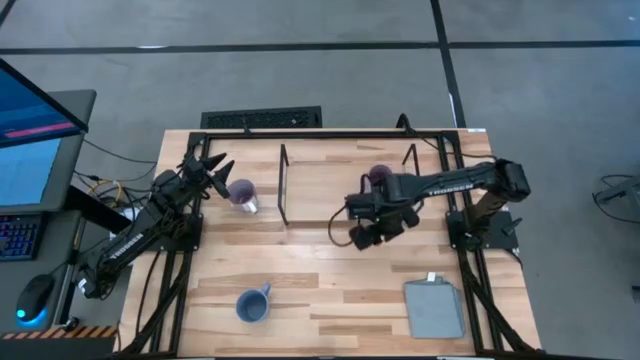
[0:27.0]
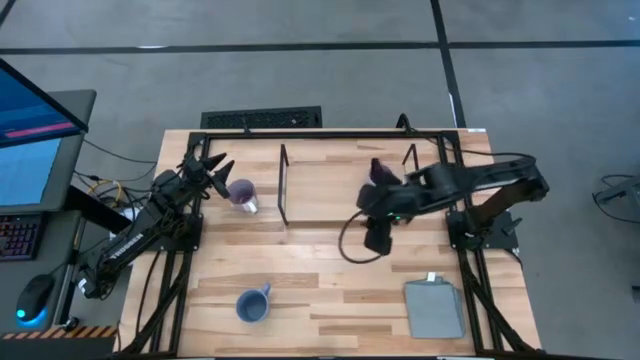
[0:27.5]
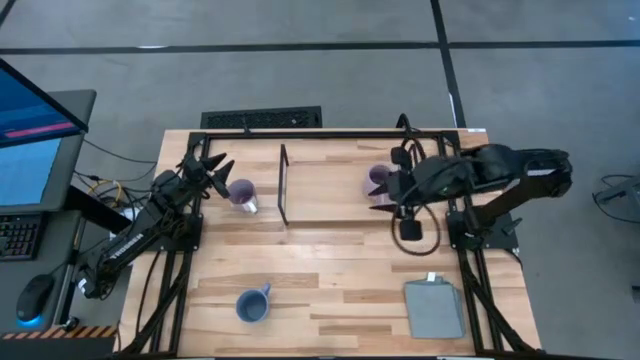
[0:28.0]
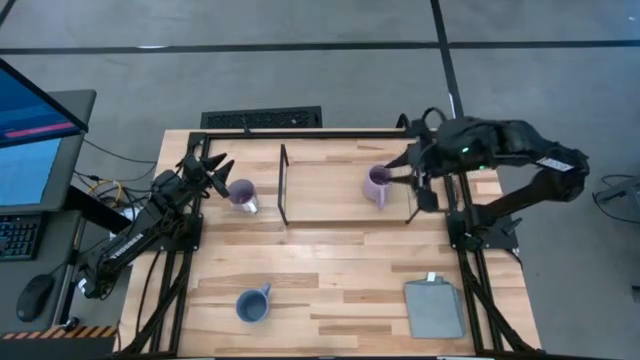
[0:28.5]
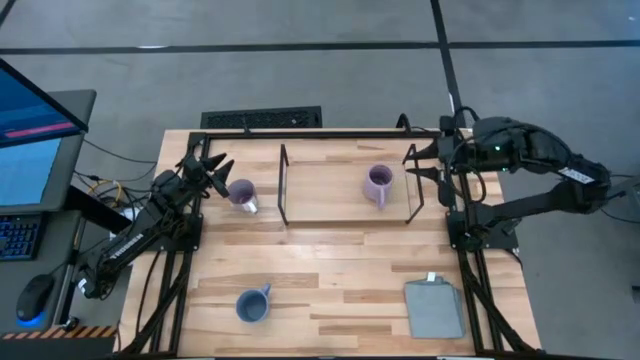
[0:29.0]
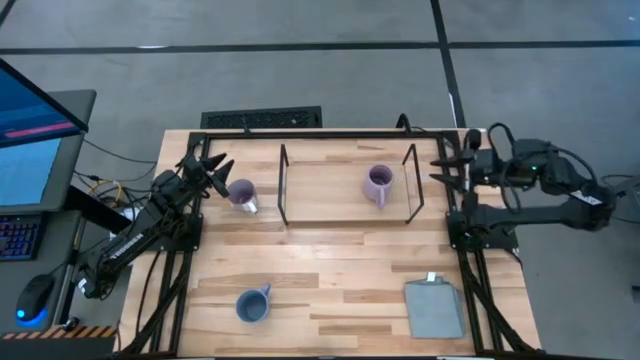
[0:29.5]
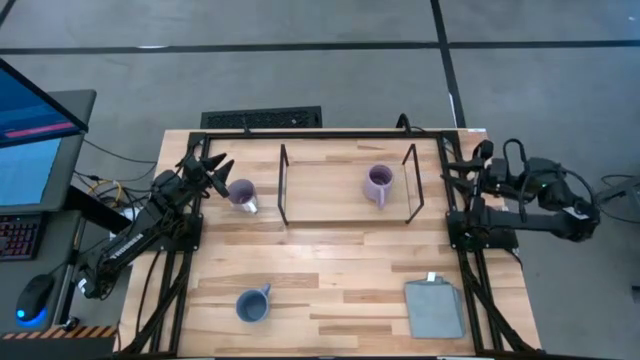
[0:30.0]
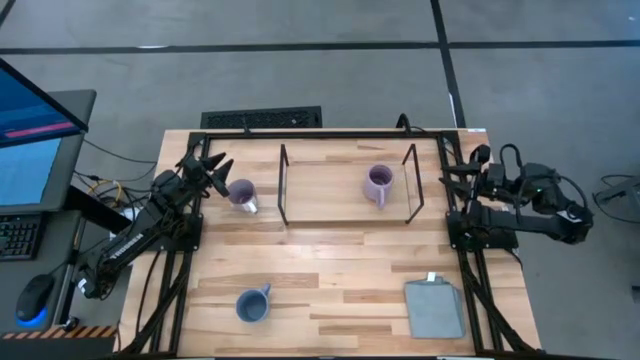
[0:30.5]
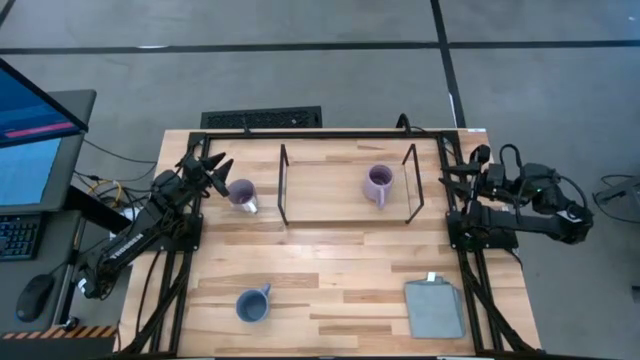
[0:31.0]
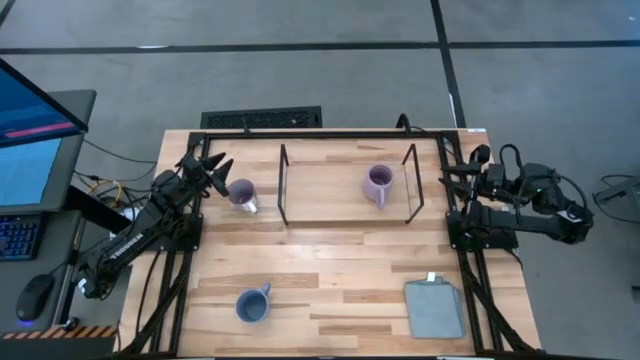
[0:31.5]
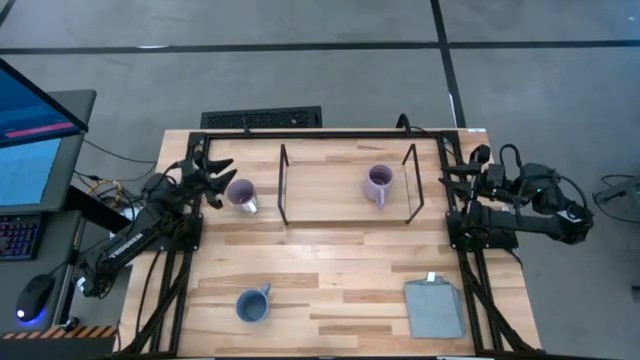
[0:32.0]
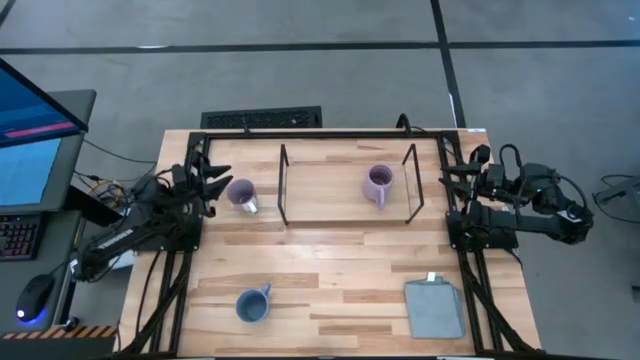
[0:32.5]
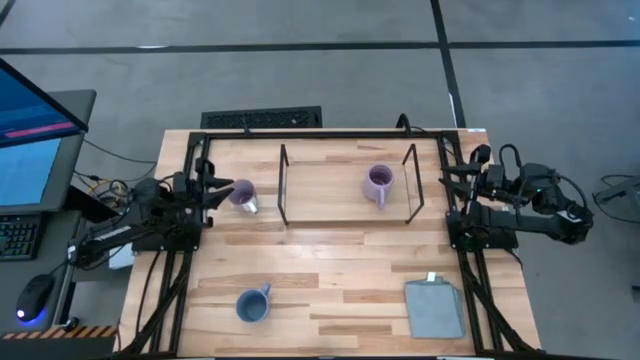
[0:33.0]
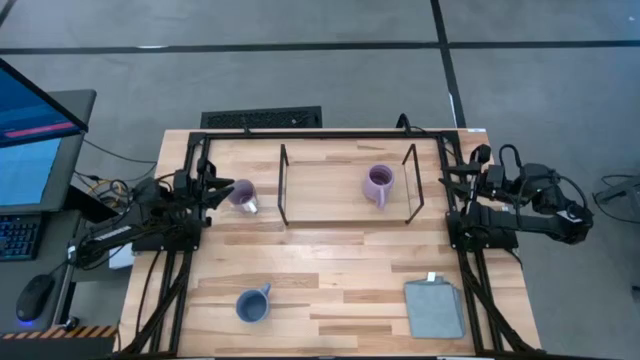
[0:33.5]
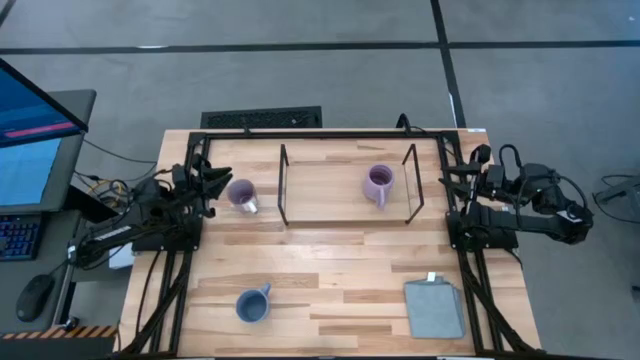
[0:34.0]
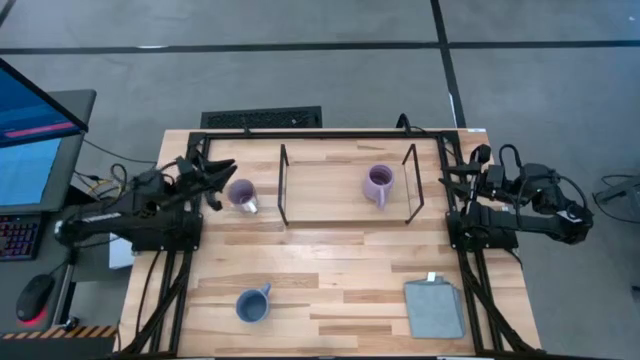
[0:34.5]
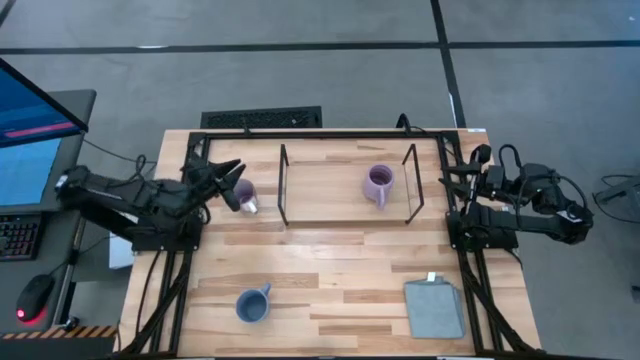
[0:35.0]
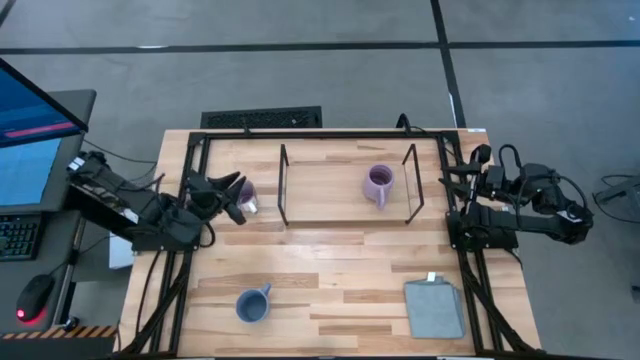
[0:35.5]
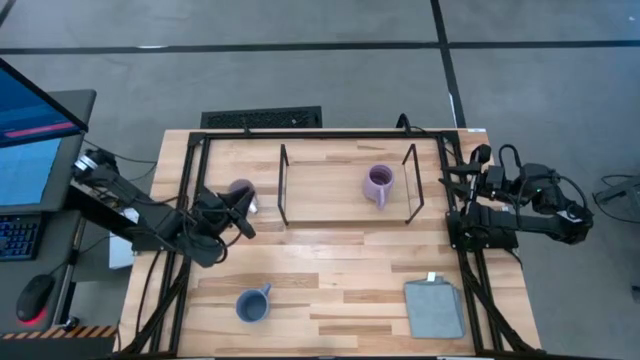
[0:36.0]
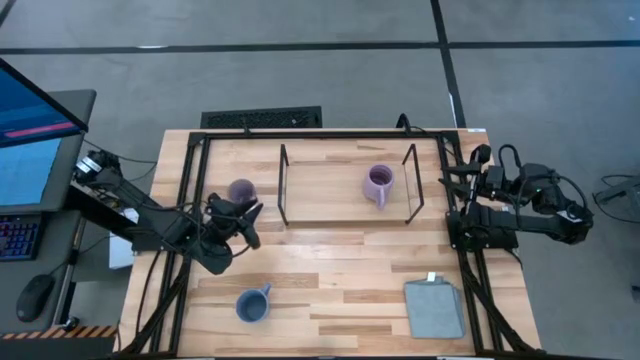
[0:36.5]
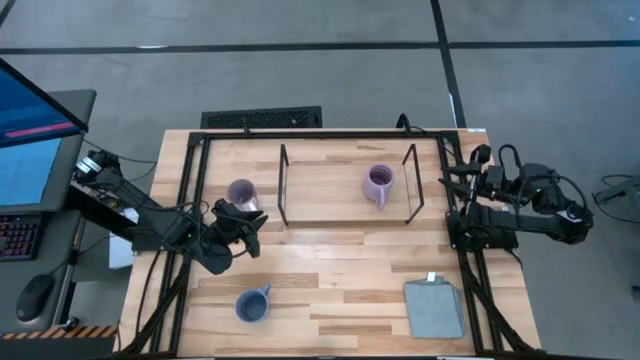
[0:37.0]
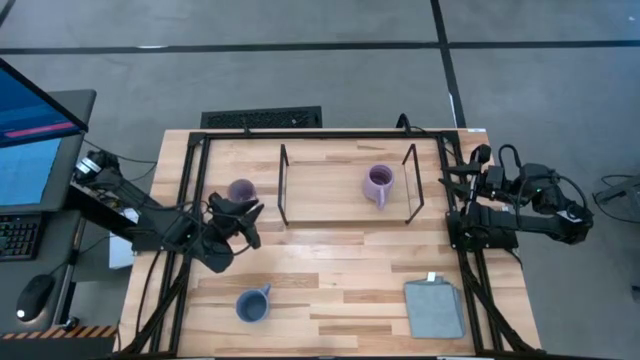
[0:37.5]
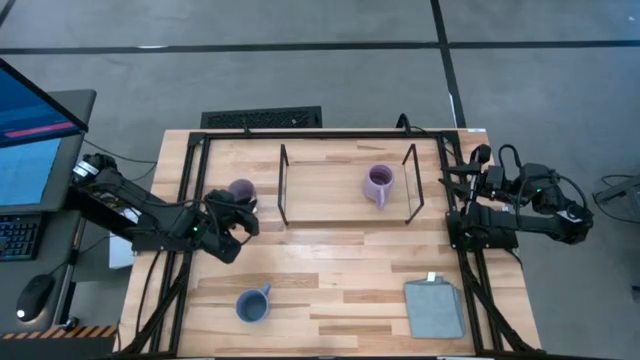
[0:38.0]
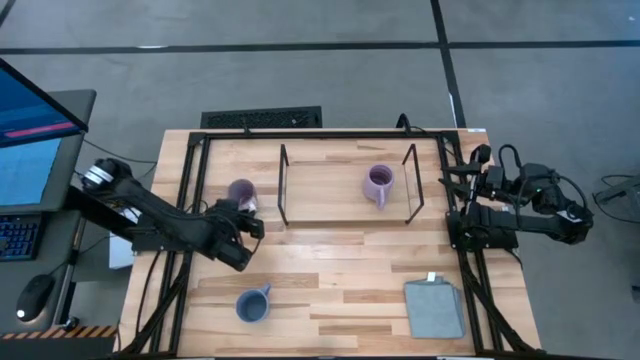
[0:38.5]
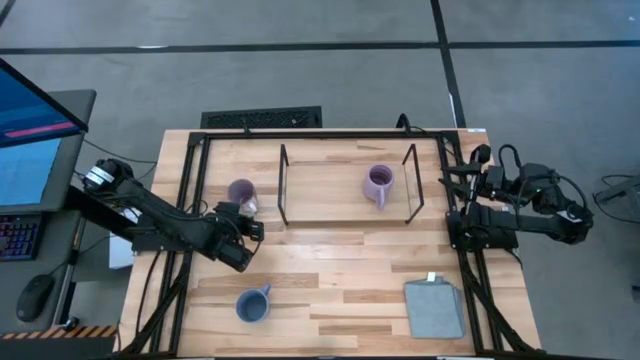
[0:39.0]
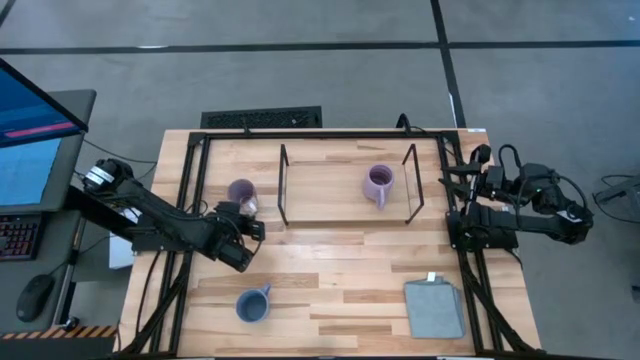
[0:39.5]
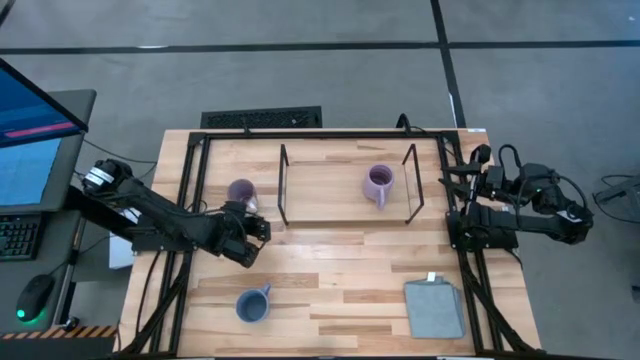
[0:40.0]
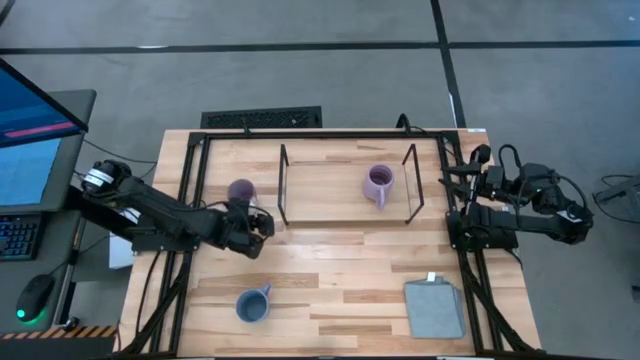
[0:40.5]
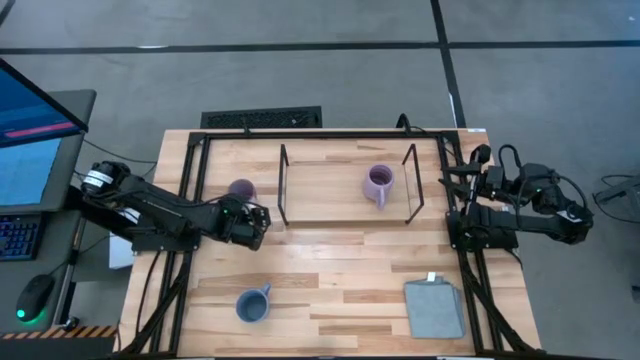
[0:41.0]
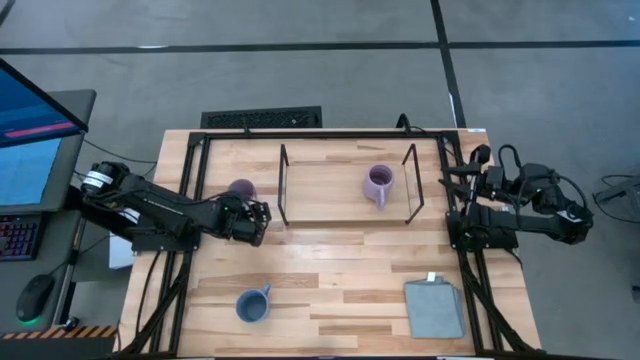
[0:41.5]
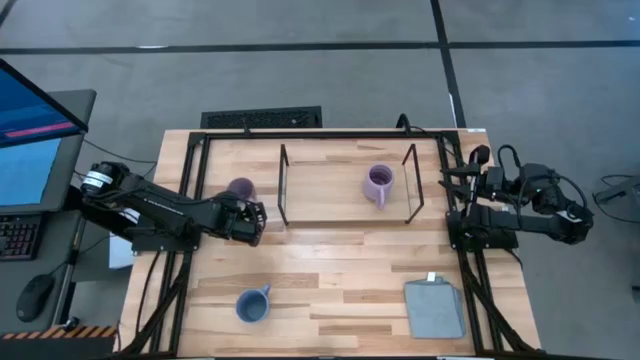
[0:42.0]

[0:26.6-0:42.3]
Task: Stack small to large cups/mugs on shelf
Put the white and violet mug on the shelf

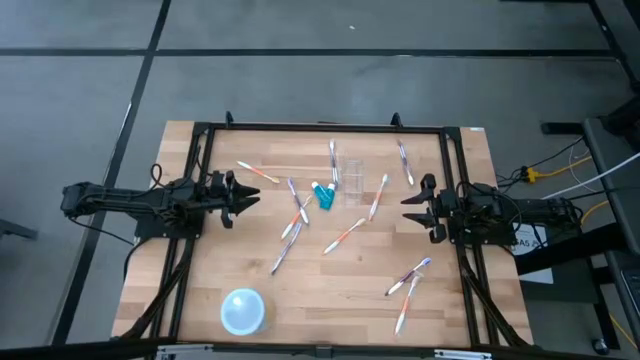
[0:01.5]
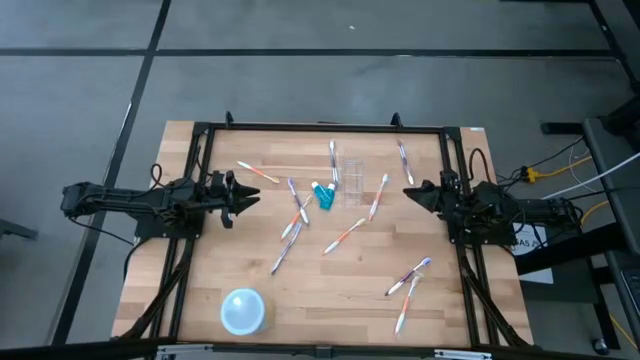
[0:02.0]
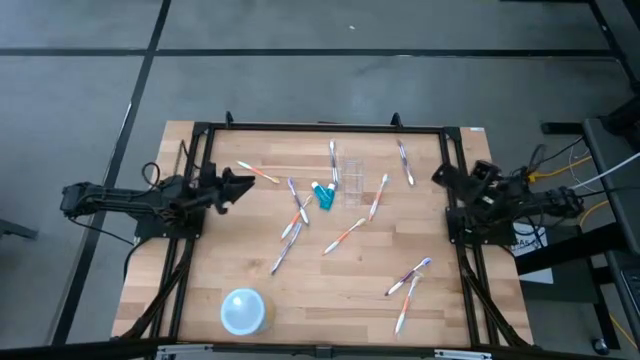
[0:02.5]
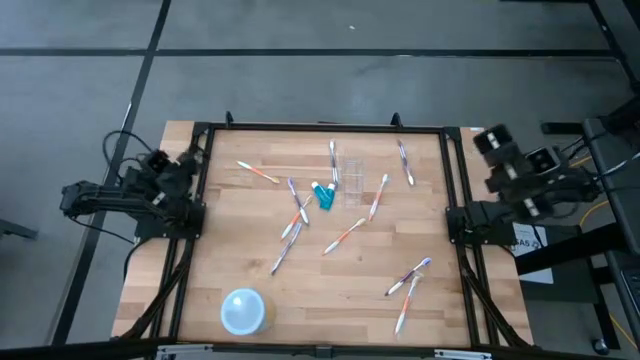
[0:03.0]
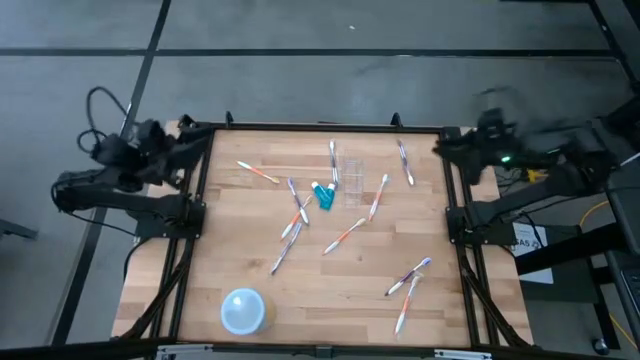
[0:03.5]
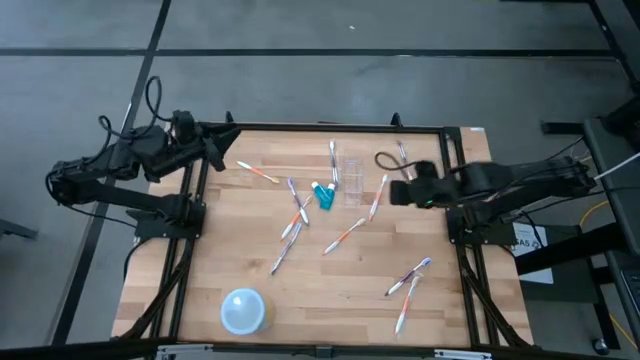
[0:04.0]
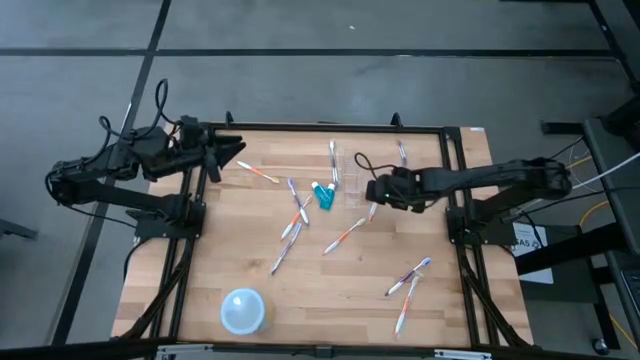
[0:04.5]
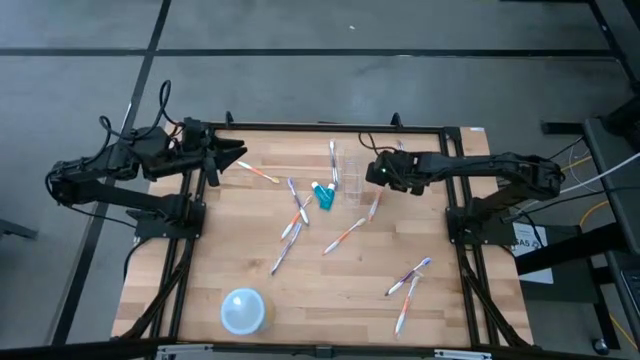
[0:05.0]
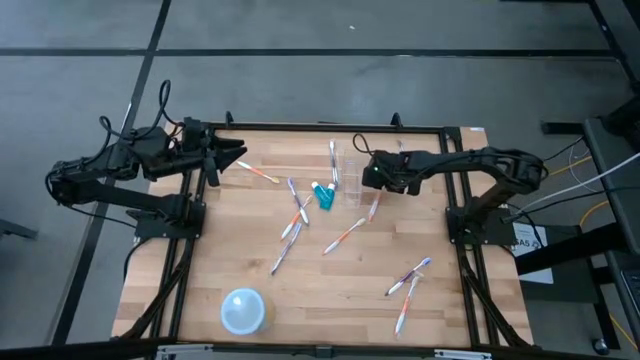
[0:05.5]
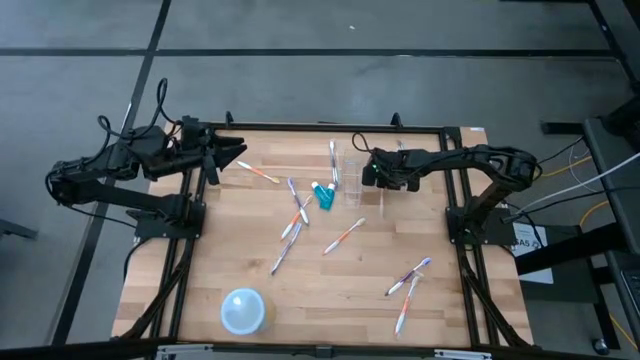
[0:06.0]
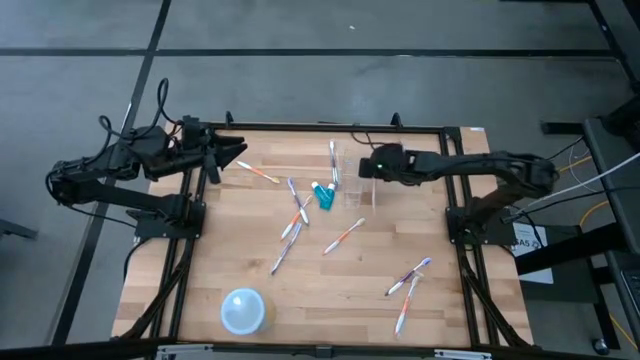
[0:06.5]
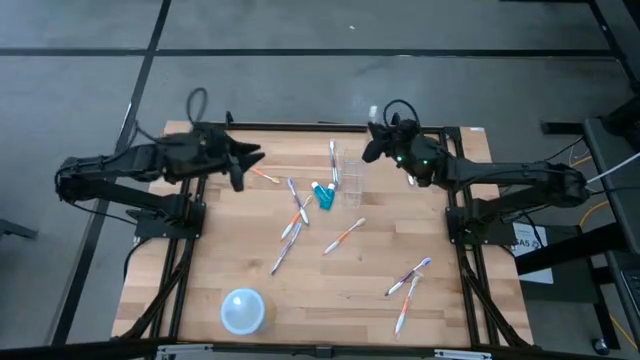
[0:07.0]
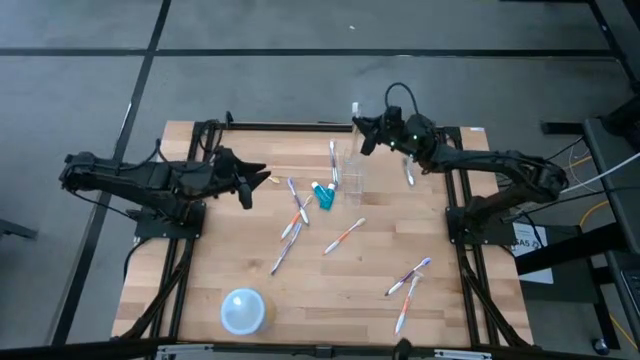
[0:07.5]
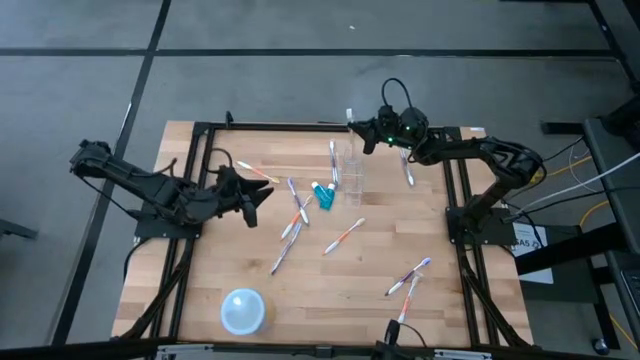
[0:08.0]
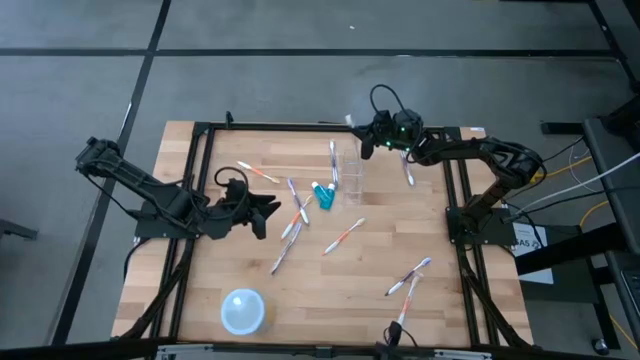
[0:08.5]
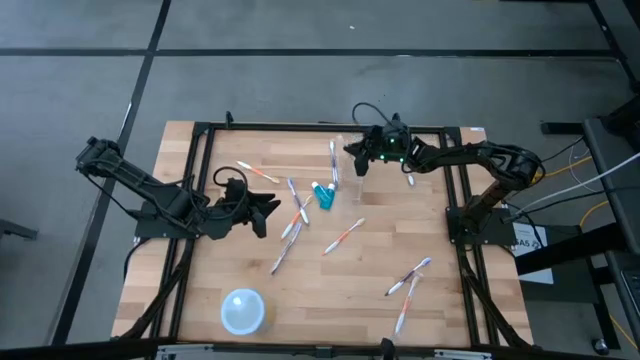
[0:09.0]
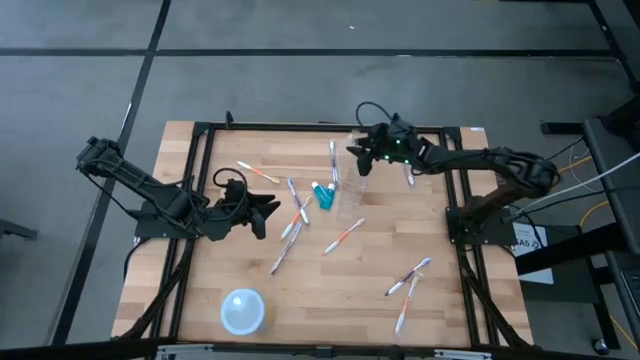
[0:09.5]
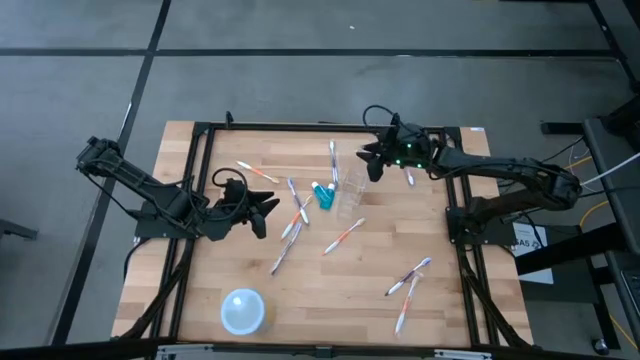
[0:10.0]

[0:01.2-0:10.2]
Task: Pick & Place toothbrushing station
Put the orange toothbrush into the transparent organizer
